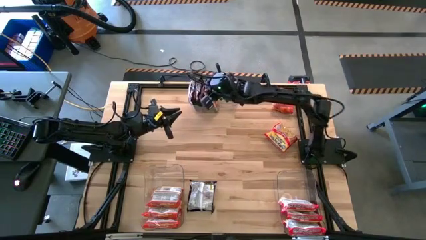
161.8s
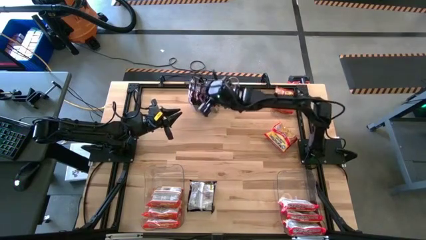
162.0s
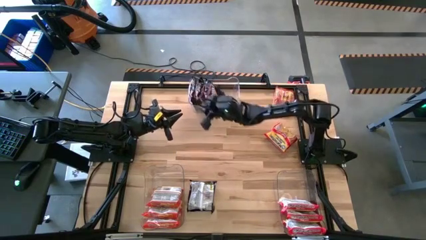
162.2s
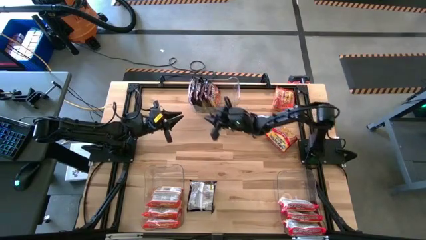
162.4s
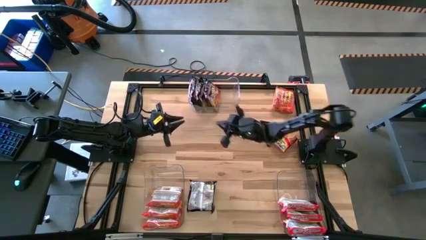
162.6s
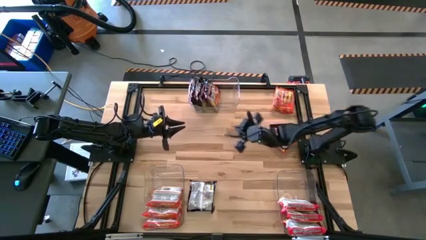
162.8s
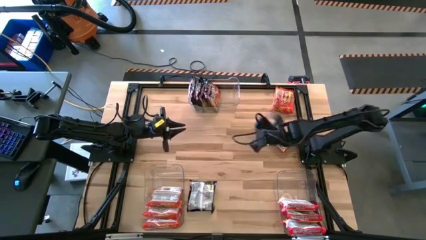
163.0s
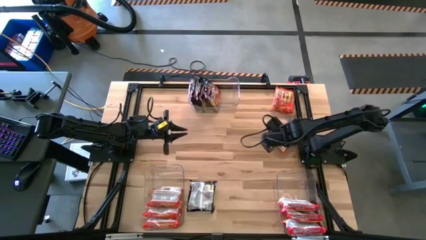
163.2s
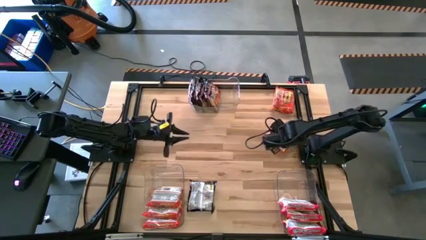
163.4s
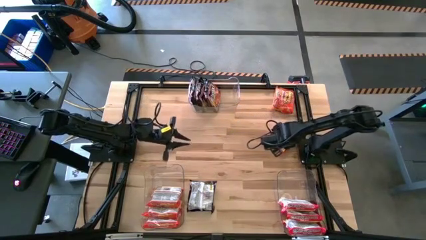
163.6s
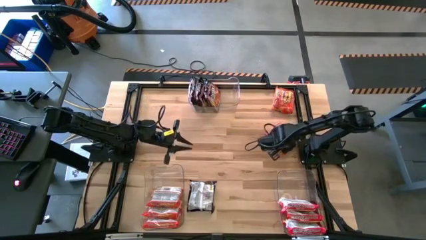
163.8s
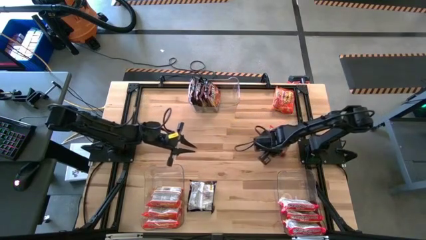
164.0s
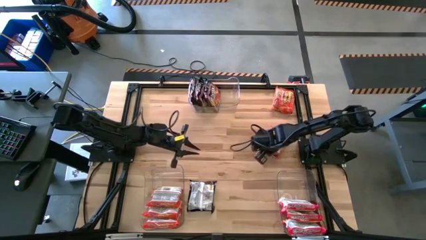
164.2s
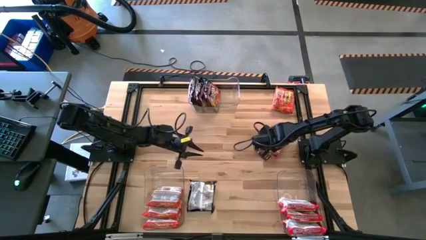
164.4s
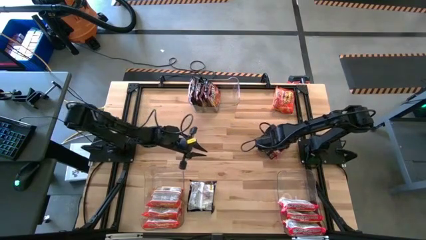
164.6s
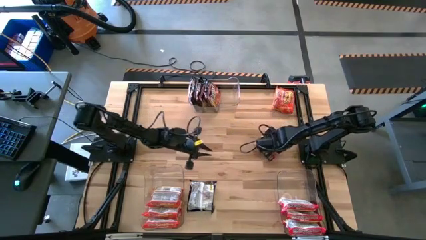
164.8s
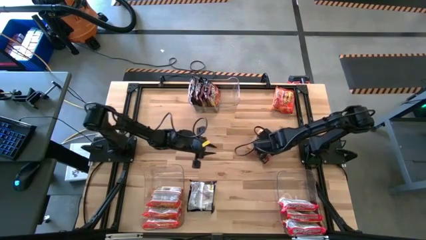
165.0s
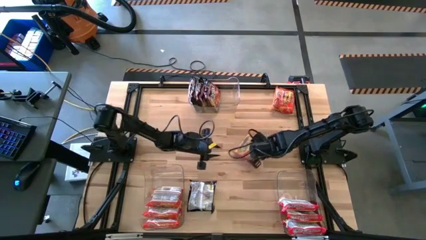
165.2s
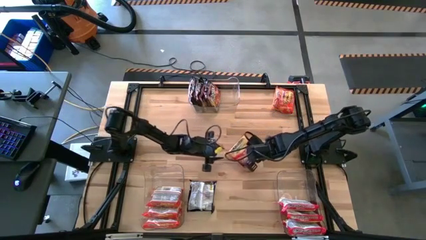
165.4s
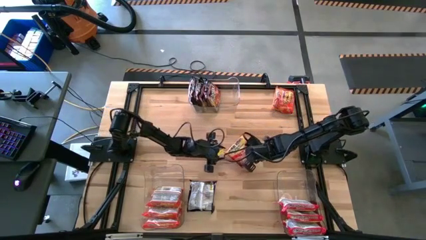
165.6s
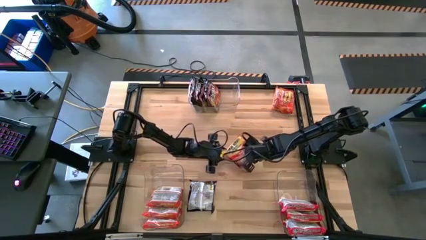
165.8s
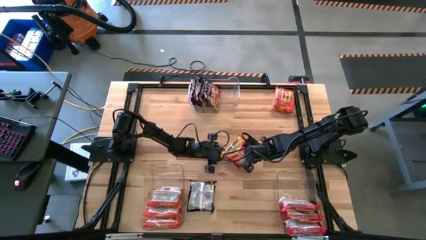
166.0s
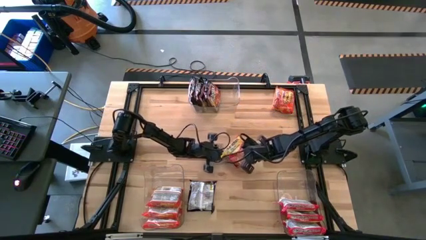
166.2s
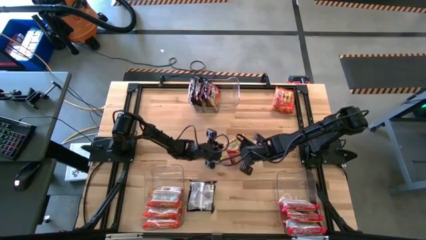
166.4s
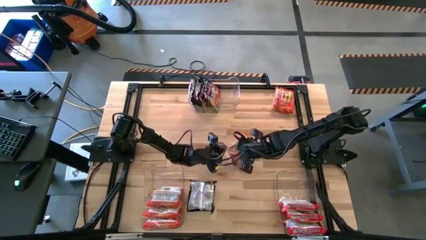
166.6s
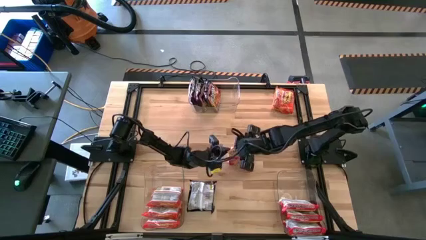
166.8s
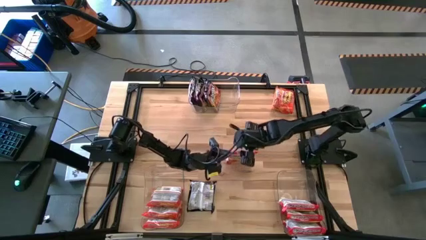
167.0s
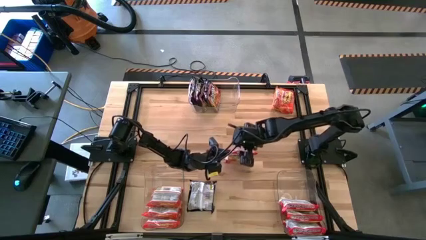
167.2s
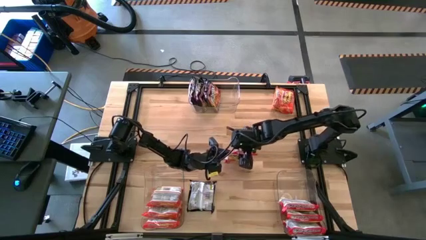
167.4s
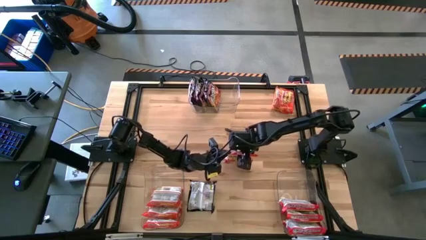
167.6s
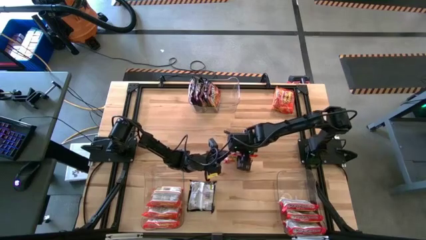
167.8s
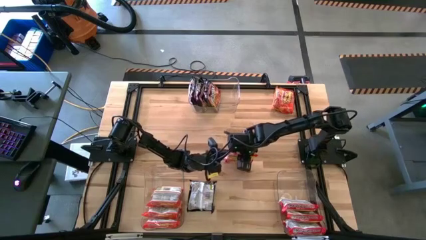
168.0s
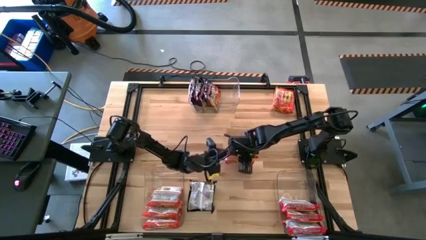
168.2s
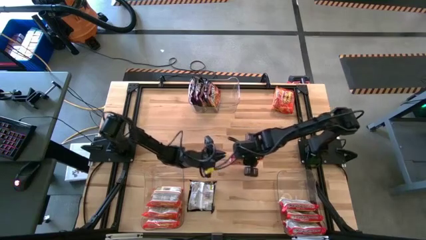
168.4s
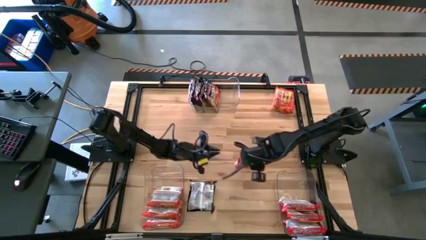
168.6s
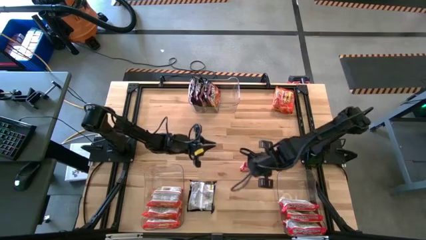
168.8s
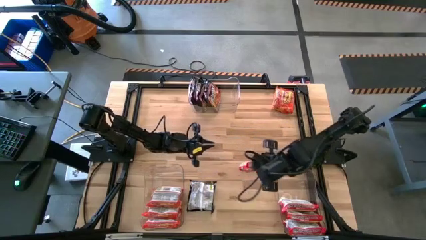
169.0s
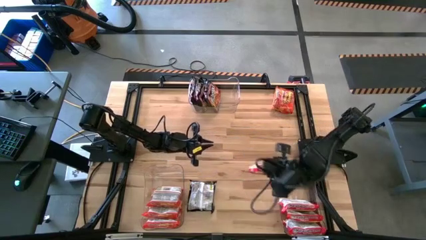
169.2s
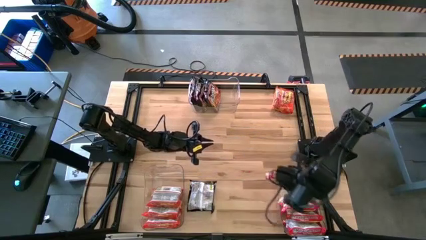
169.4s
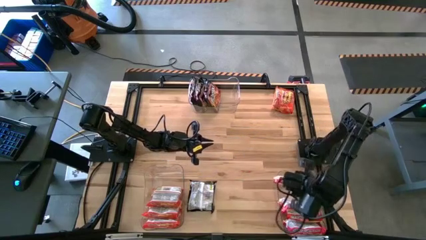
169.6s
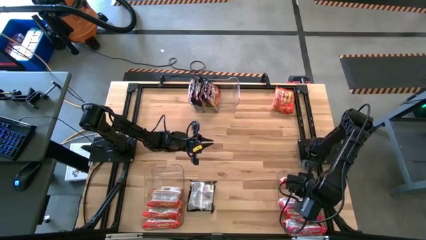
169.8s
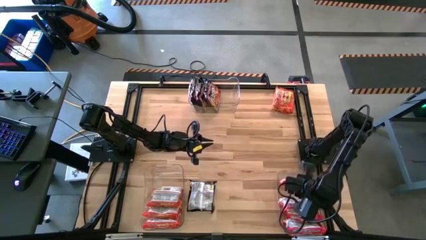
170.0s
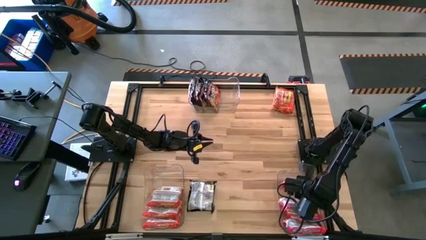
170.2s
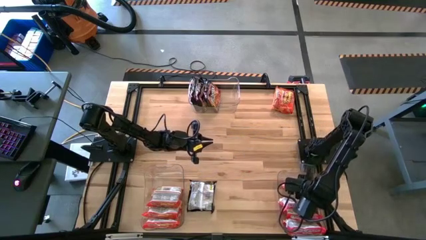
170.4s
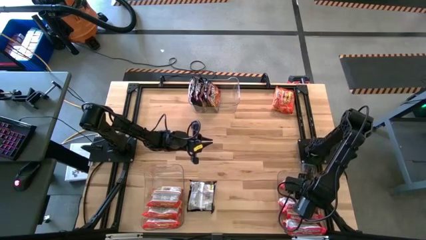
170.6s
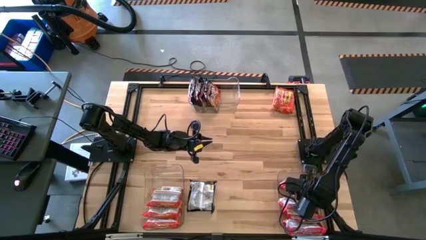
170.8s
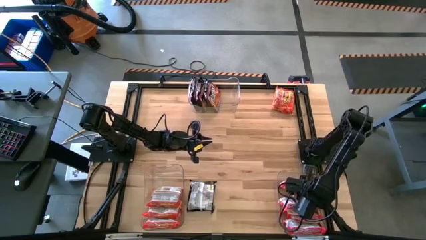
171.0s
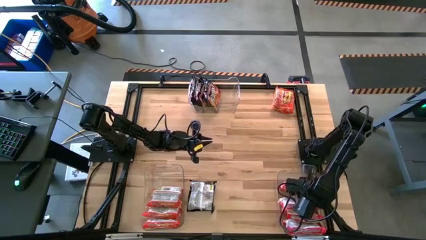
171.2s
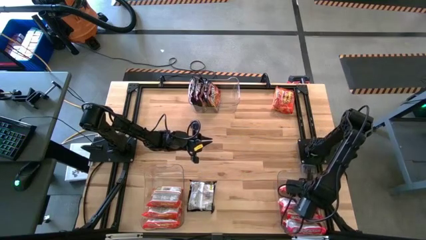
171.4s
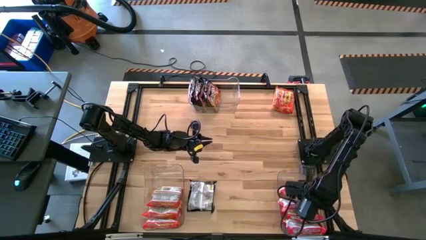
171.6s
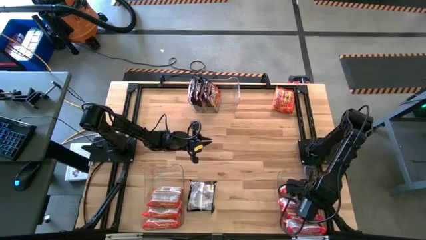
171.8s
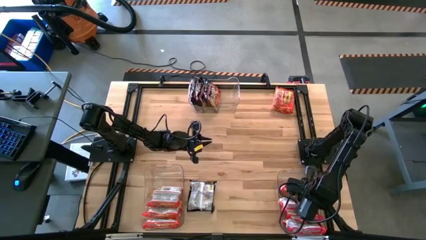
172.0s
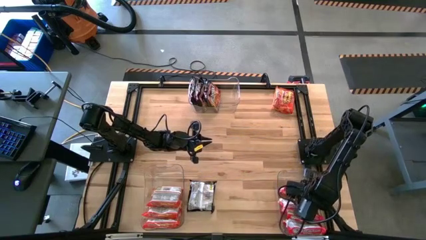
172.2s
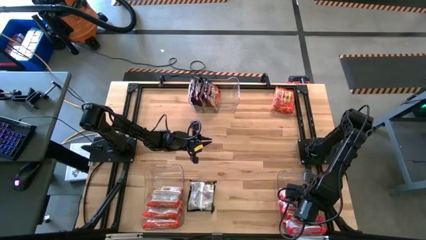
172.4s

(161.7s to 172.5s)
Task: Sort Maruchan noodles
Put the red noodle pack into the bottom right transparent bin

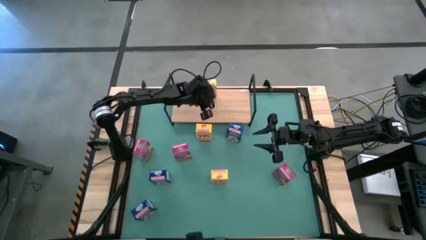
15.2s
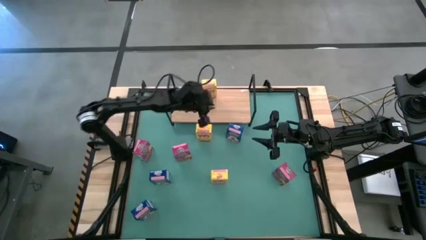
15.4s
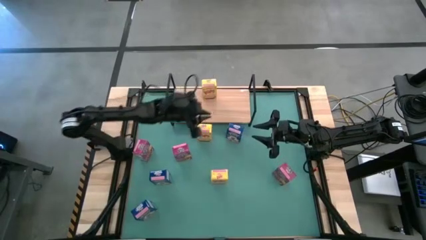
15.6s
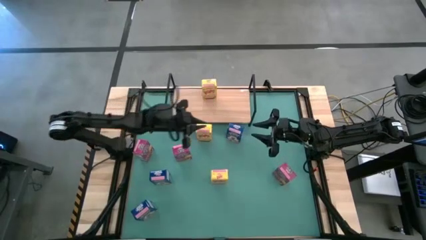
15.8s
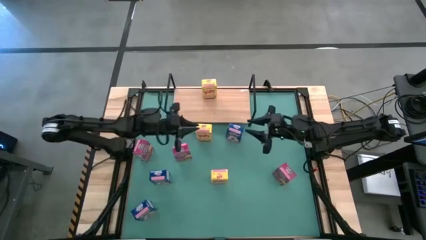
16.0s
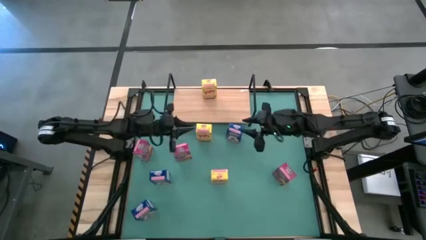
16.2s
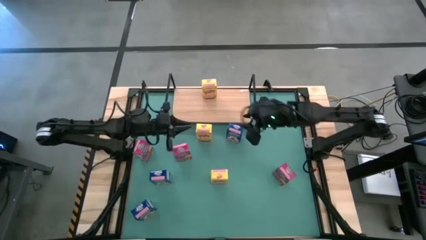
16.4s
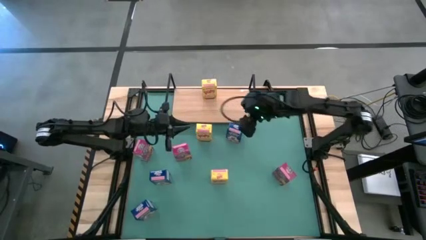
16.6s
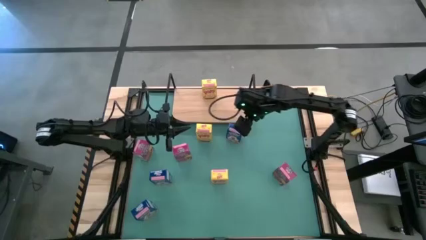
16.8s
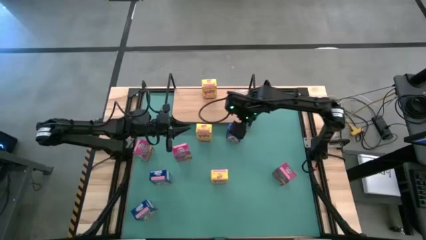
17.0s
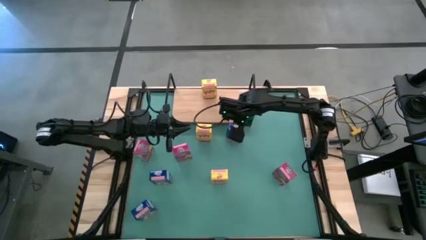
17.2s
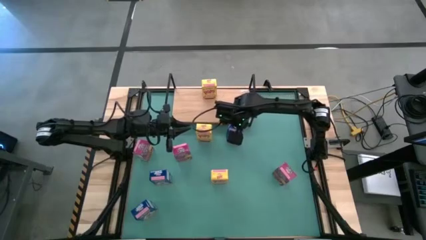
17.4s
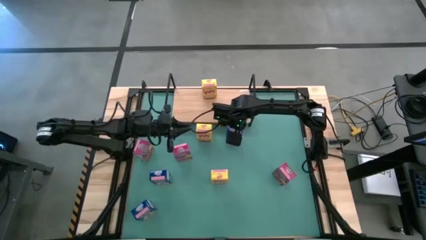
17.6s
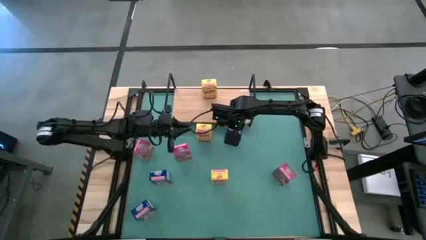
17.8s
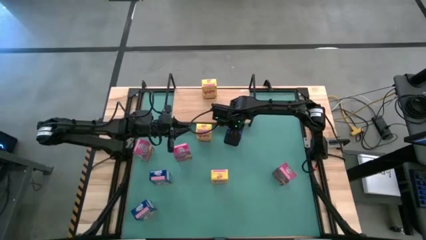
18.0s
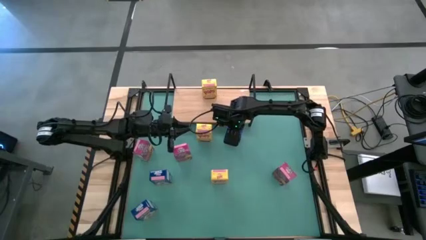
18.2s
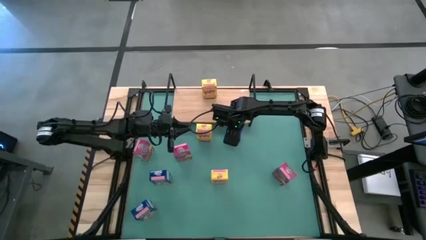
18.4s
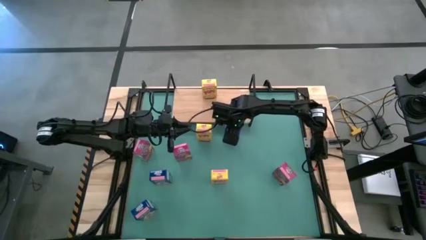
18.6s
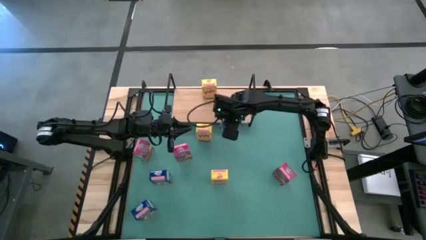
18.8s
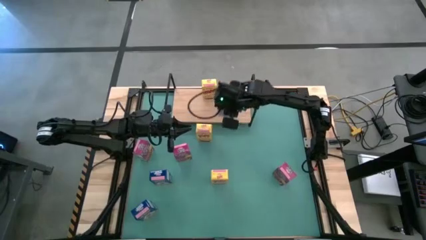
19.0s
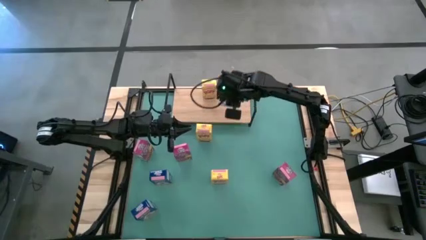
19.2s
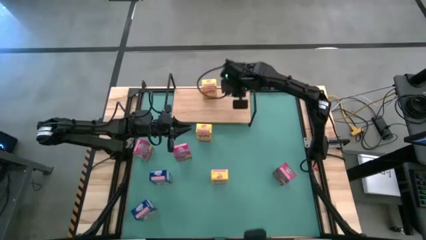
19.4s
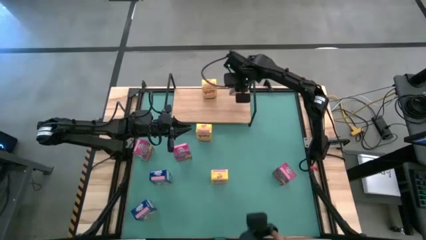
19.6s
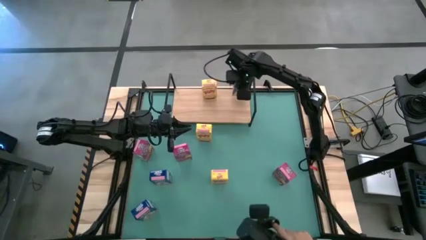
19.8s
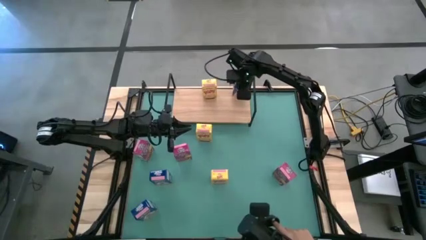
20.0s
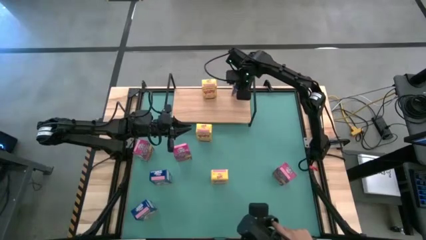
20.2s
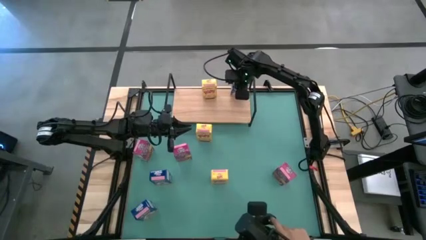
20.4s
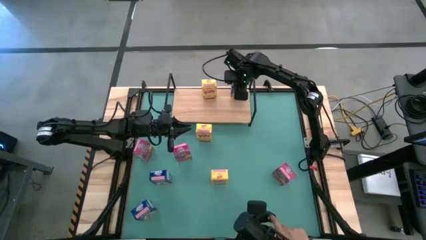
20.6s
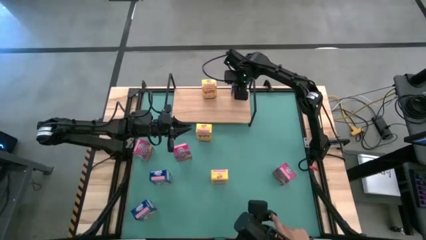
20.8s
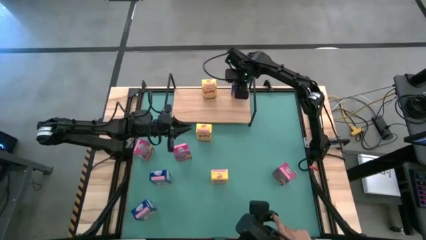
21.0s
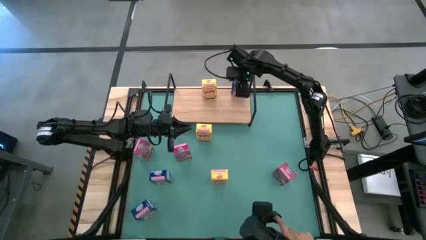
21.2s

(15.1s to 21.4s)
Task: Stack cereal on shelf
Put the right blue cereal box on the shelf
